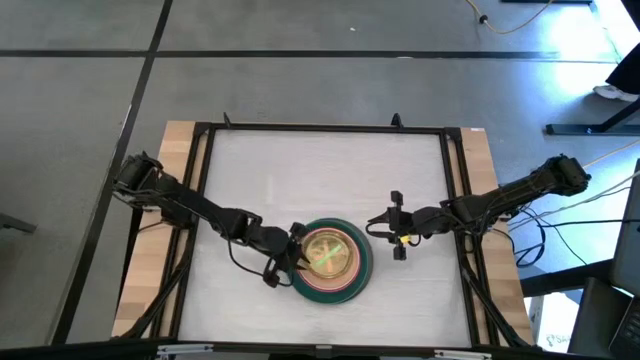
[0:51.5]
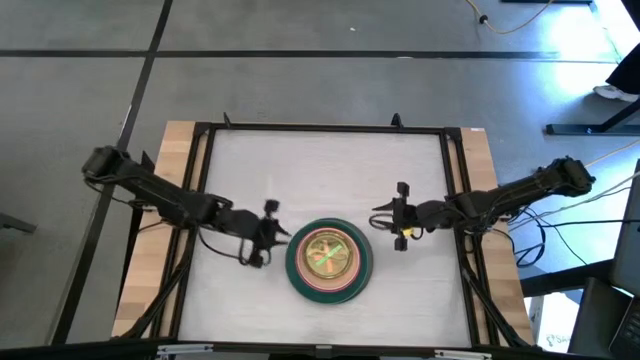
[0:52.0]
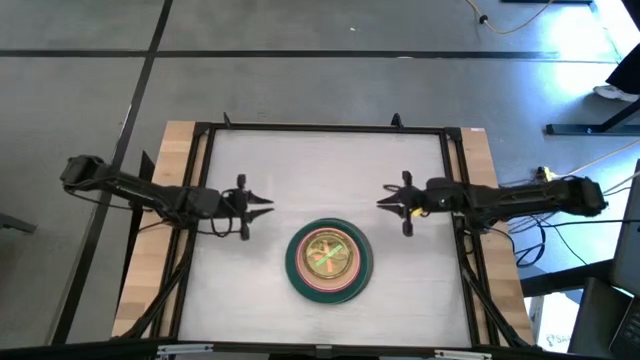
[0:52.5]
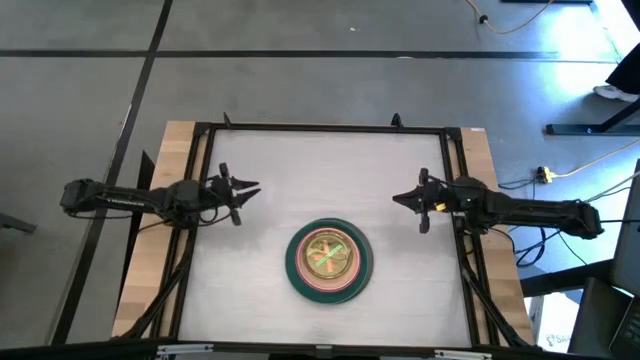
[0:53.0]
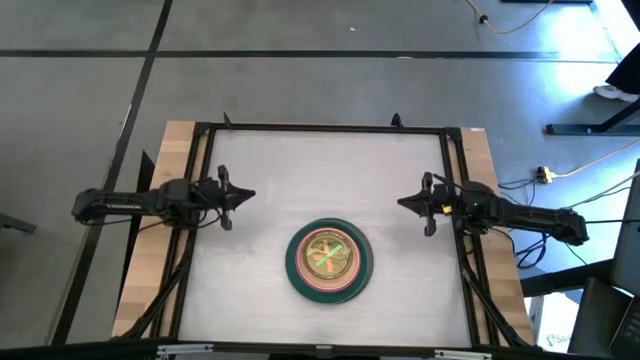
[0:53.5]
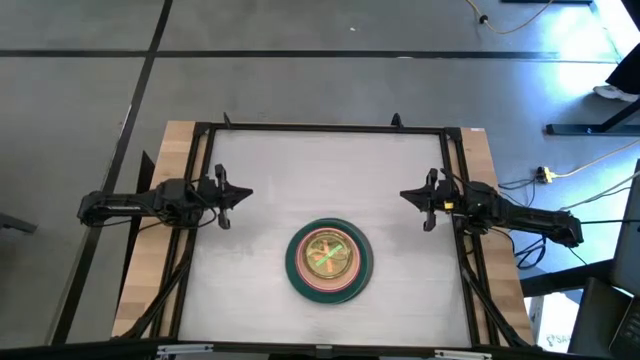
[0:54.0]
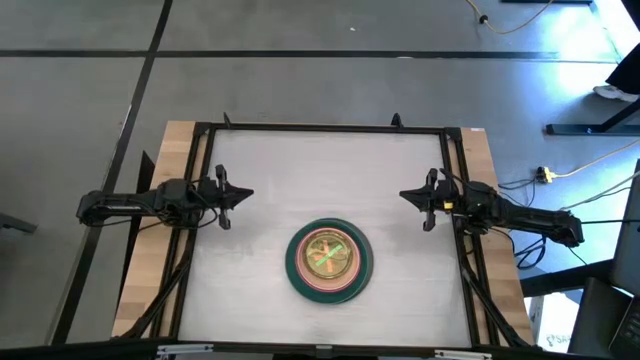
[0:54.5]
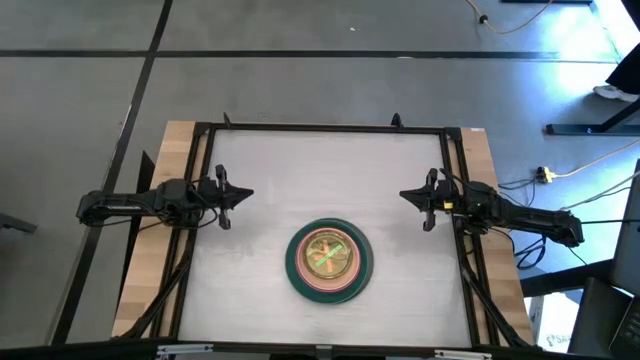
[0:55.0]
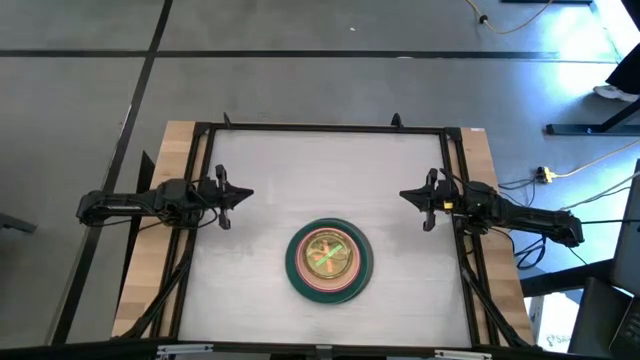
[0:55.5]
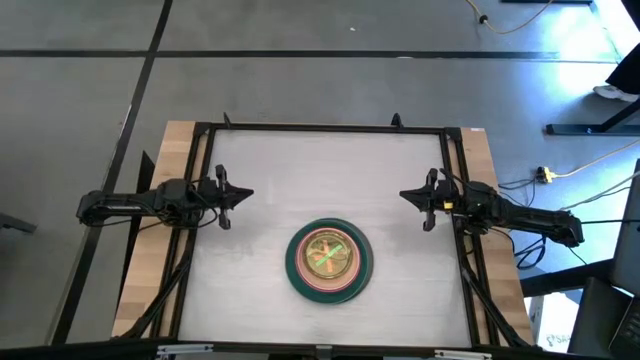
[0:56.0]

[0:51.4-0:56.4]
Task: Stack plastic plates
Return to Home Position

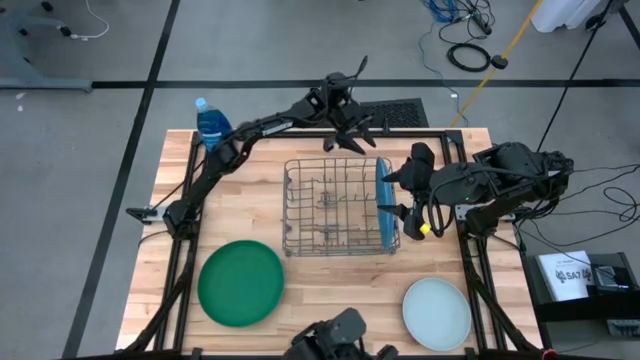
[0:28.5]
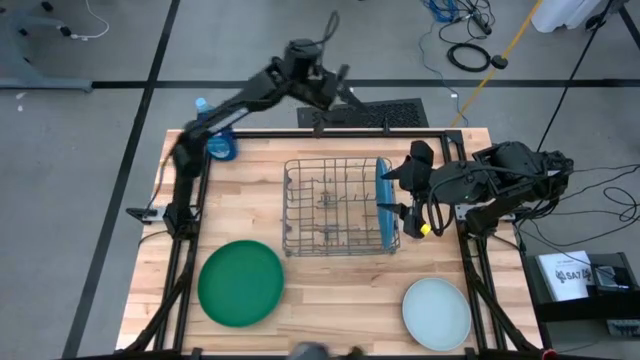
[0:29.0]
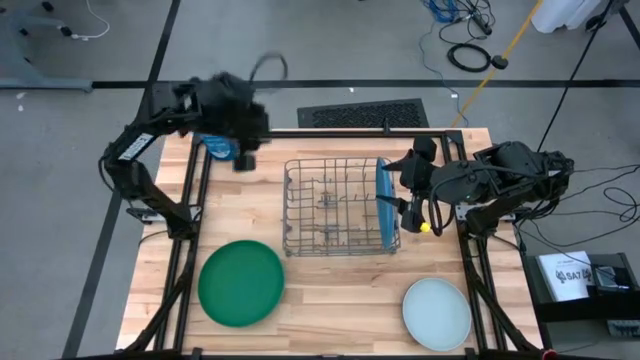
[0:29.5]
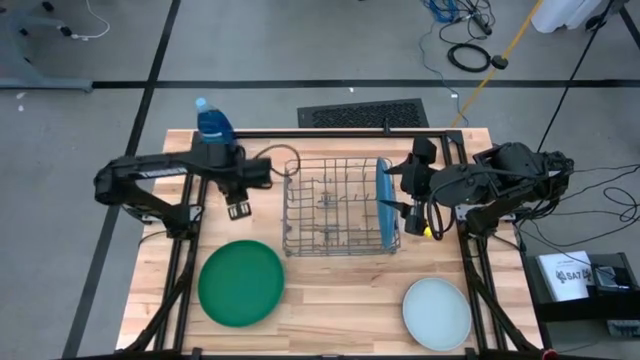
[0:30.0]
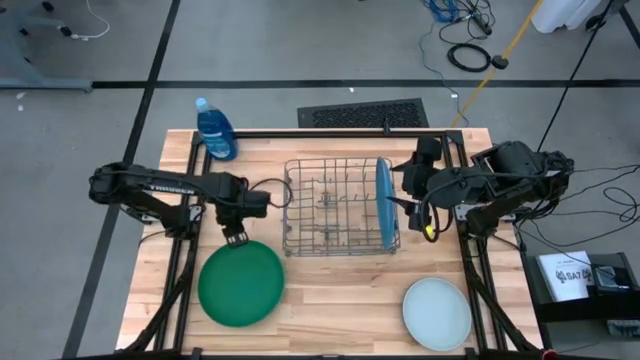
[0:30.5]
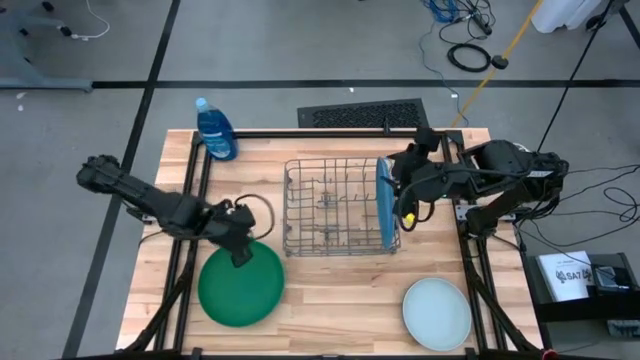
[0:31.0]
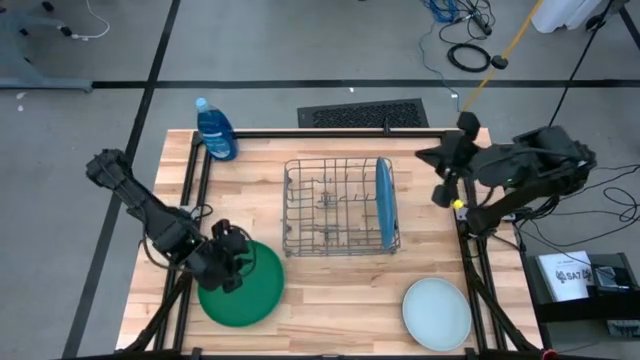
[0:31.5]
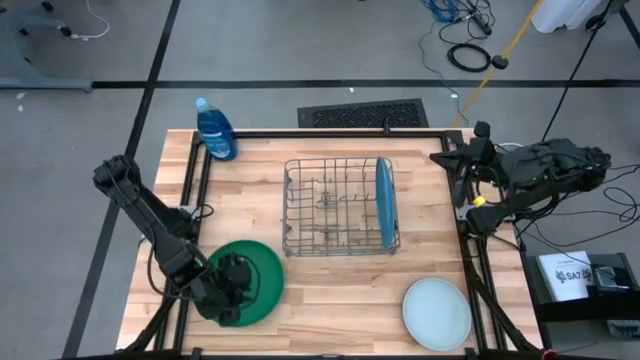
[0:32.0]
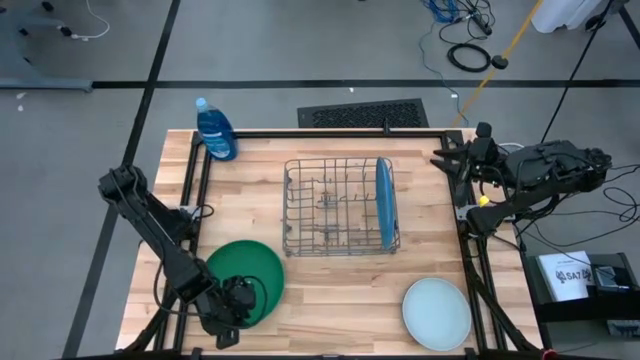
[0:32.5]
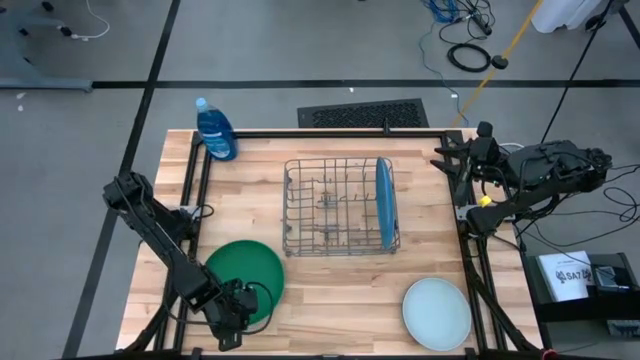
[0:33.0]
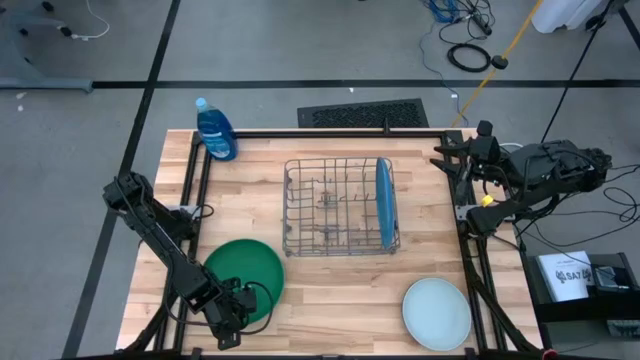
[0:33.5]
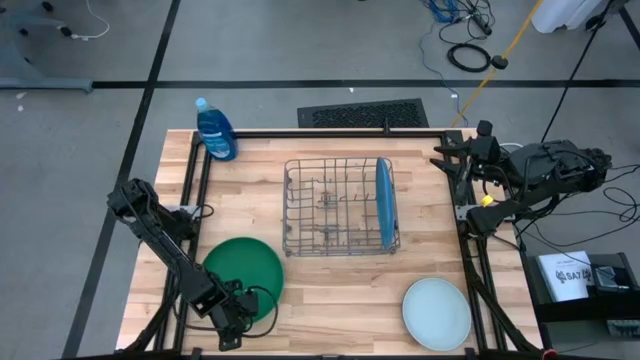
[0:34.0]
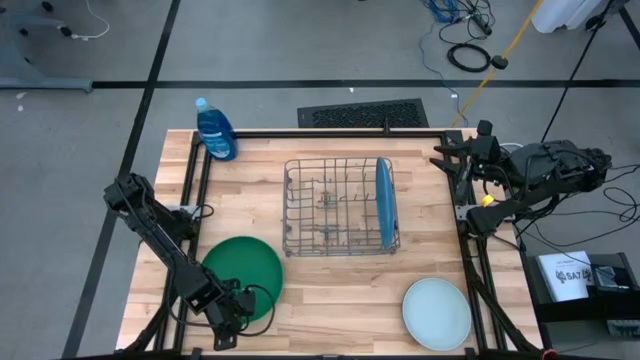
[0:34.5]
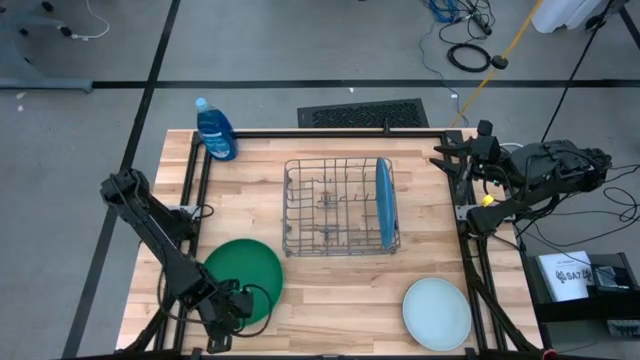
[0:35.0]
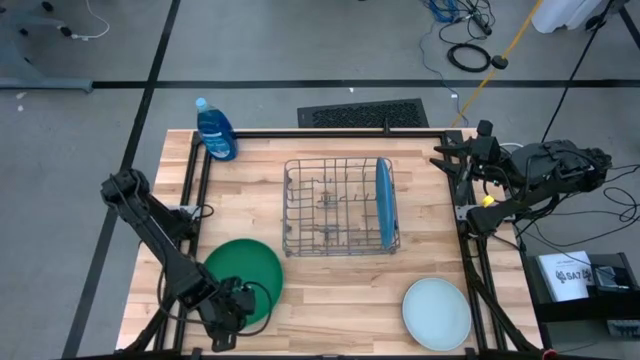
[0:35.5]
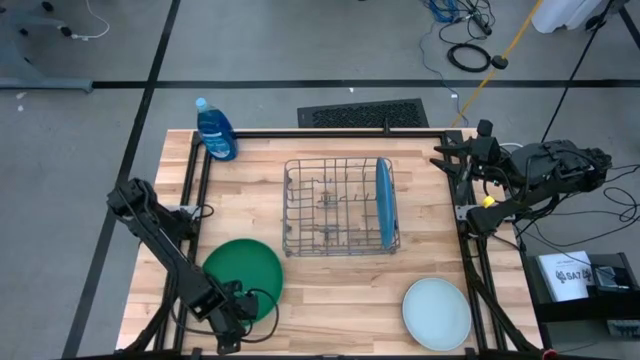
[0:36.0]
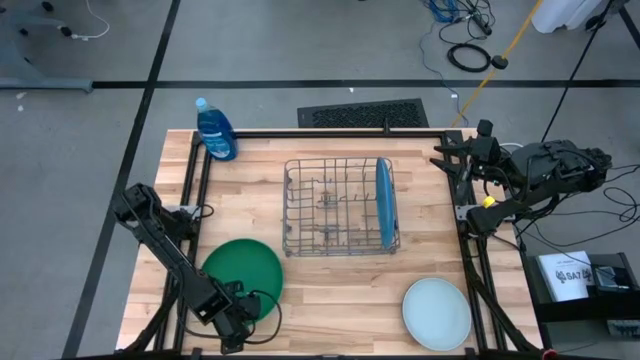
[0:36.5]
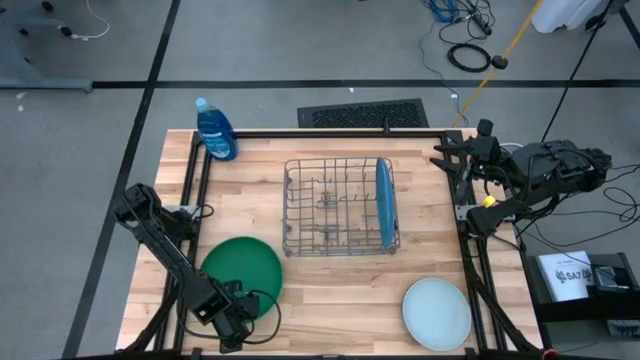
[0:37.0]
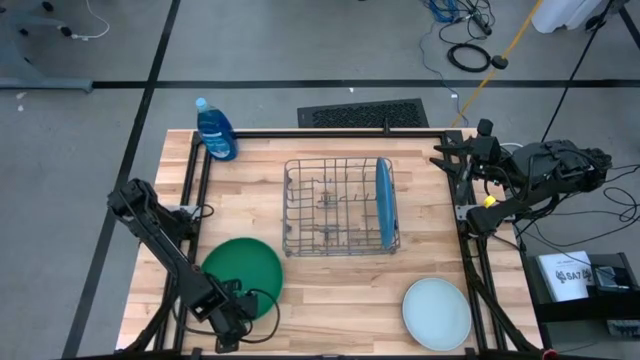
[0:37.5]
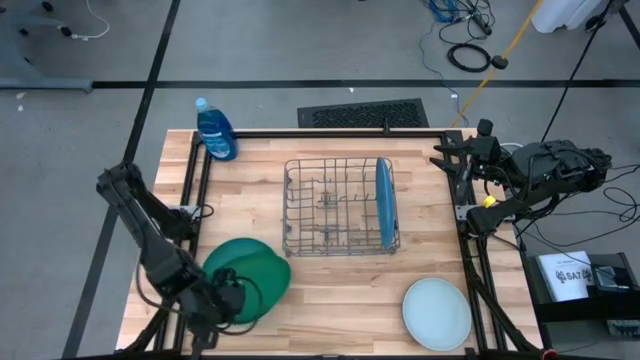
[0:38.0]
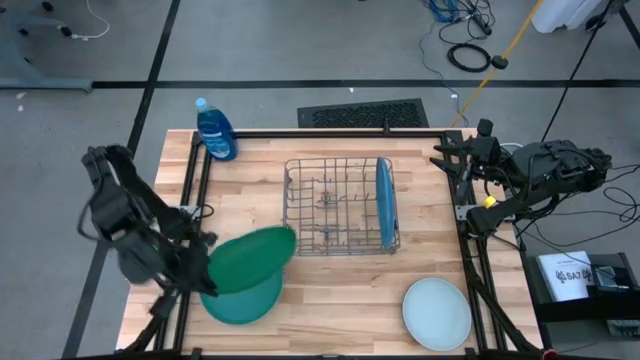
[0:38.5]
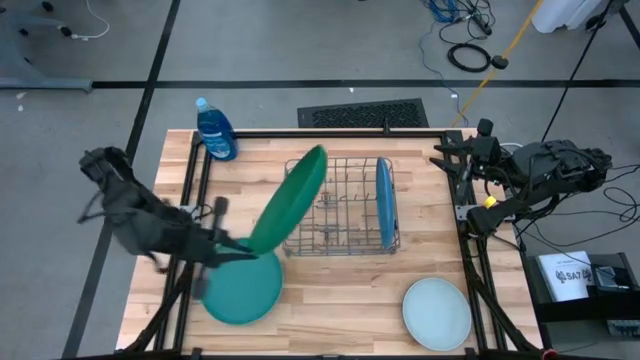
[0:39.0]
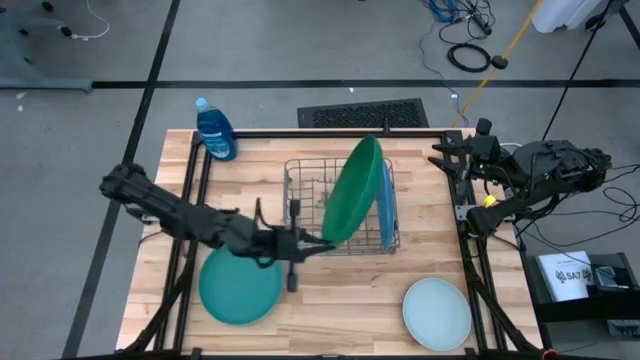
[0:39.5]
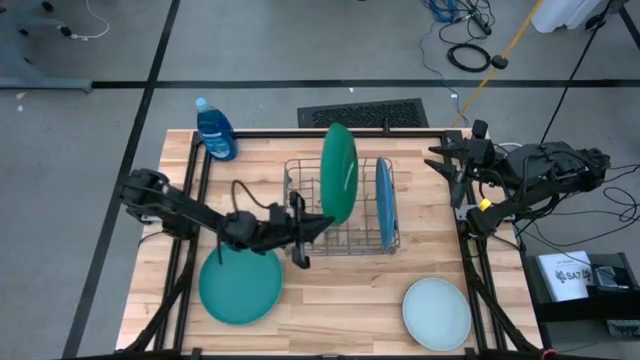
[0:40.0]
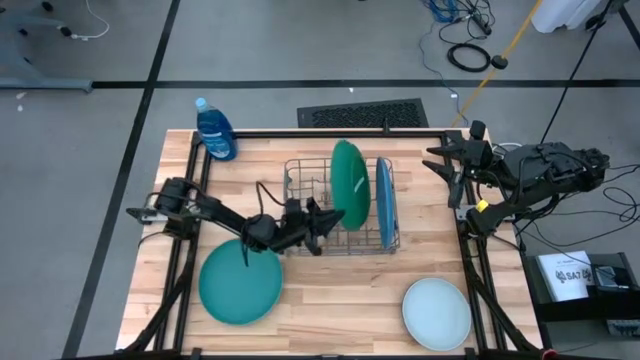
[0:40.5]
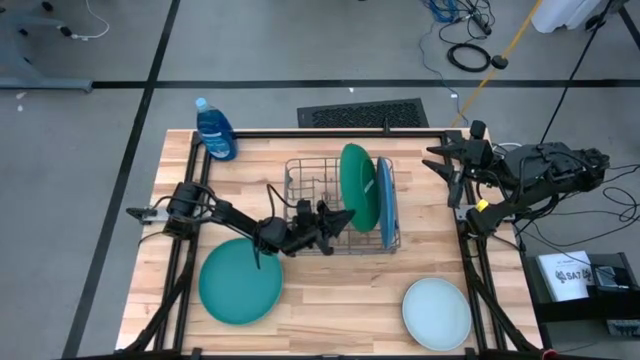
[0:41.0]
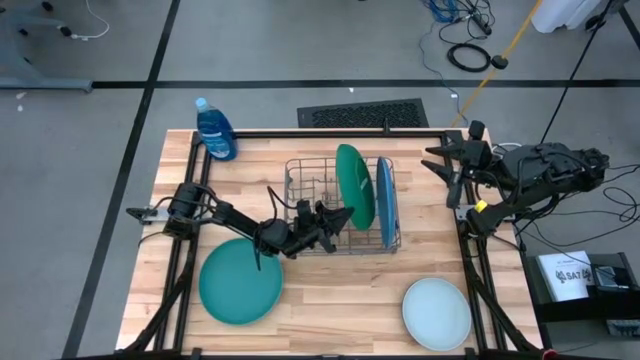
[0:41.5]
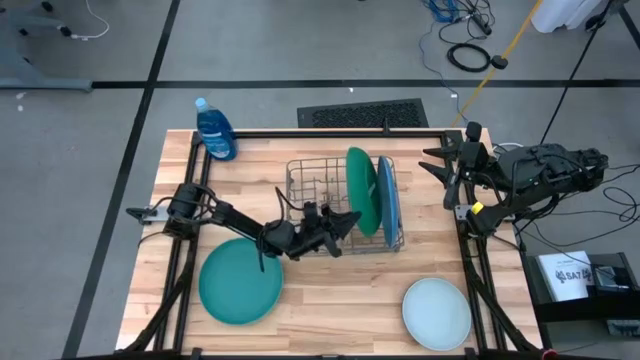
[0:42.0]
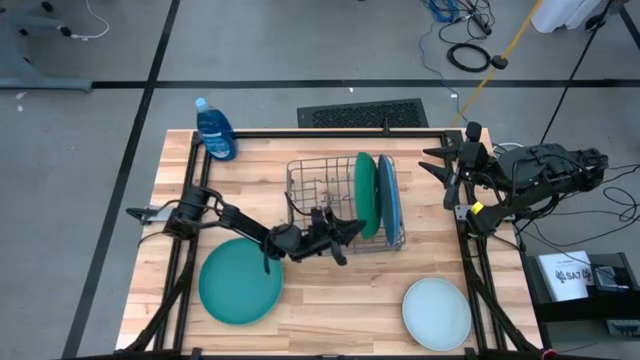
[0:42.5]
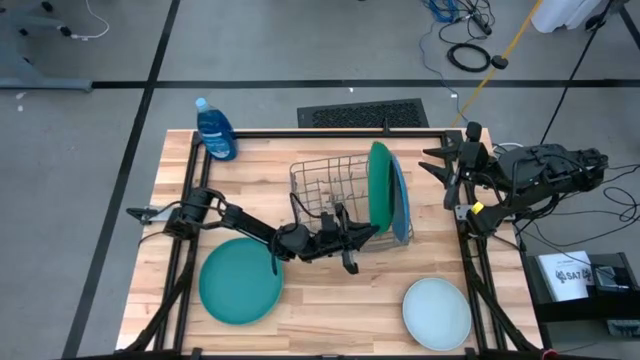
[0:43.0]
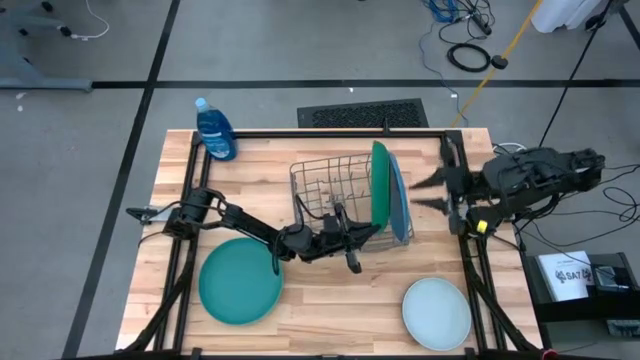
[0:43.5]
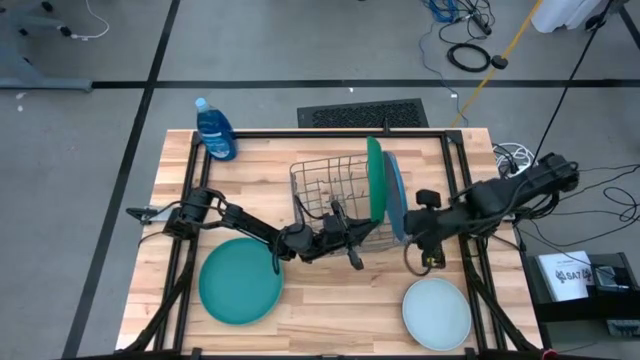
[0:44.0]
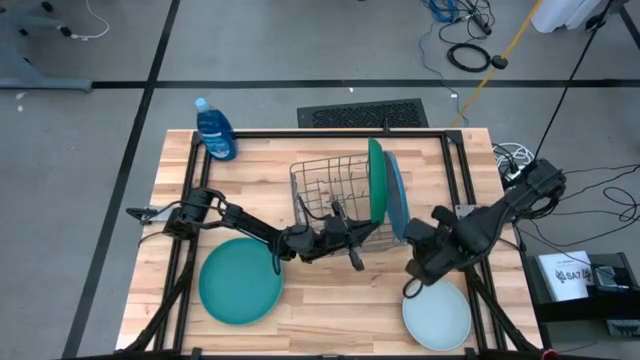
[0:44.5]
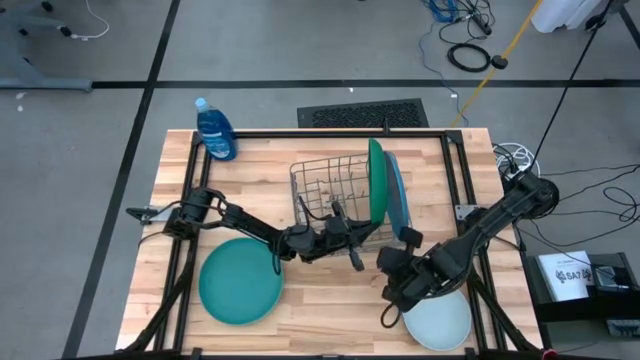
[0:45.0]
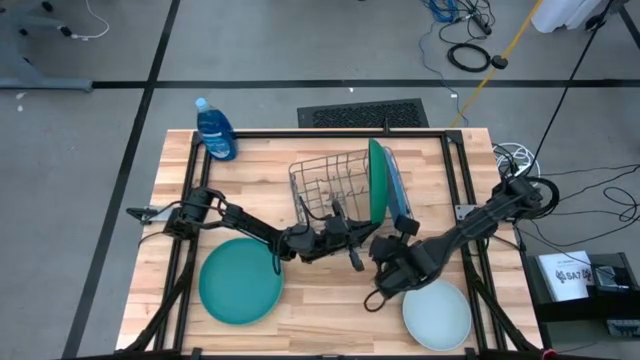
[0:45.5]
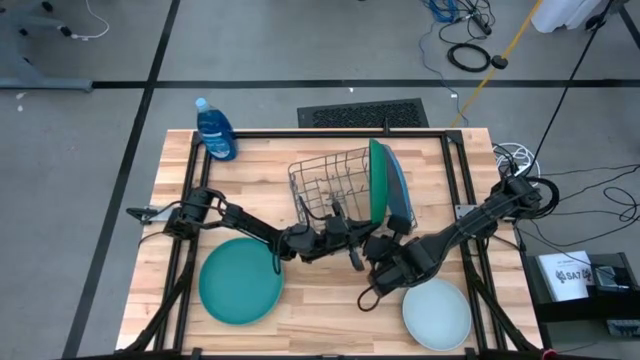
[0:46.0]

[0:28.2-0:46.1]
Task: Sort dishes
Put the dark green plate into the dish rack
